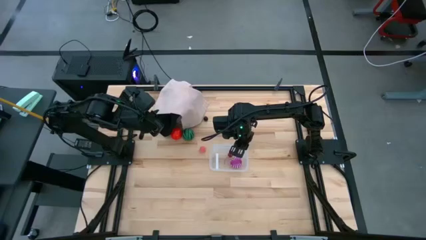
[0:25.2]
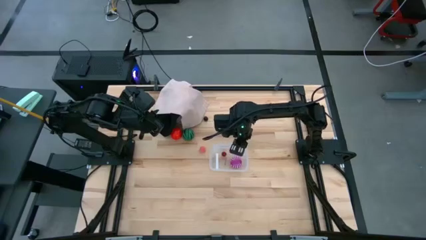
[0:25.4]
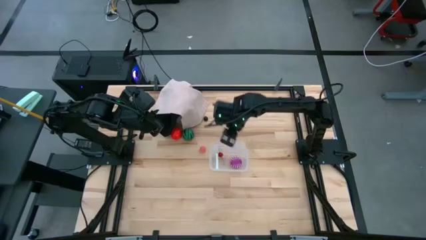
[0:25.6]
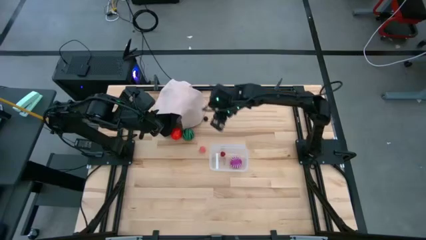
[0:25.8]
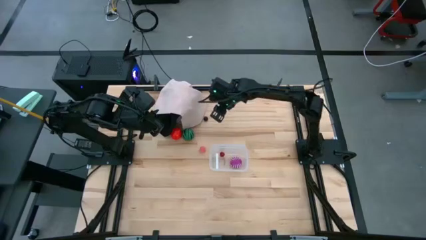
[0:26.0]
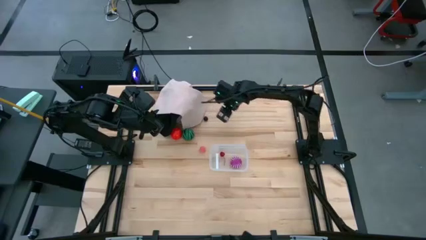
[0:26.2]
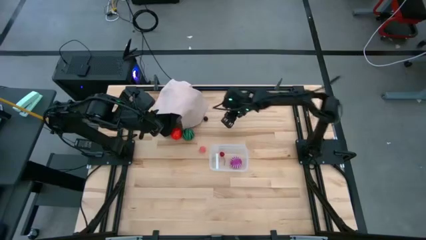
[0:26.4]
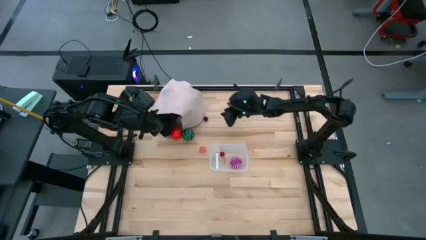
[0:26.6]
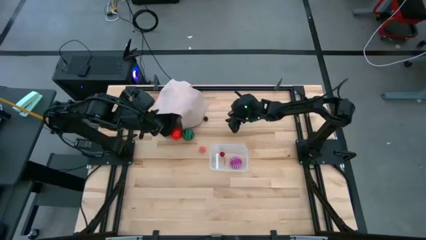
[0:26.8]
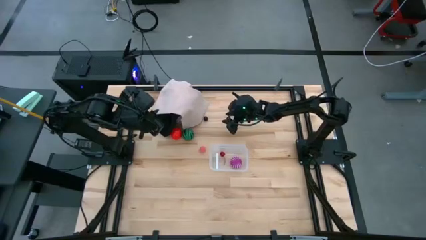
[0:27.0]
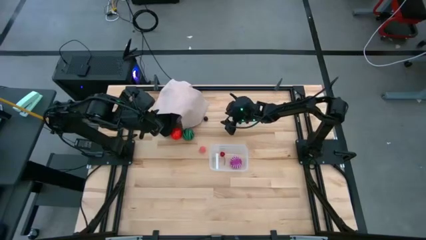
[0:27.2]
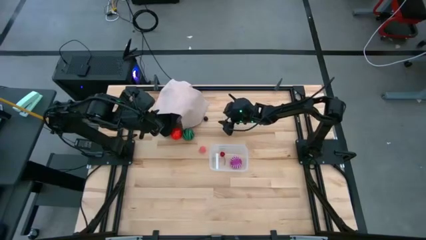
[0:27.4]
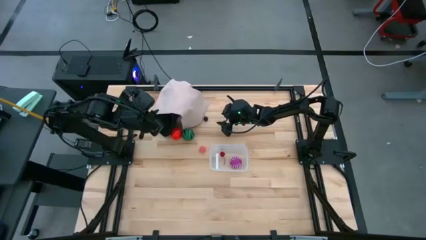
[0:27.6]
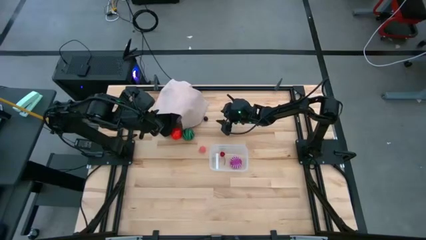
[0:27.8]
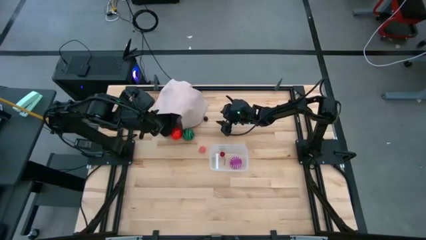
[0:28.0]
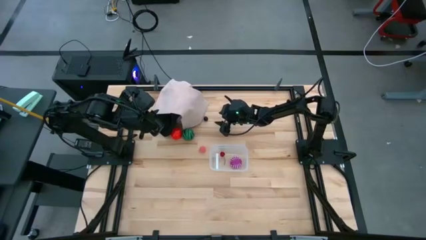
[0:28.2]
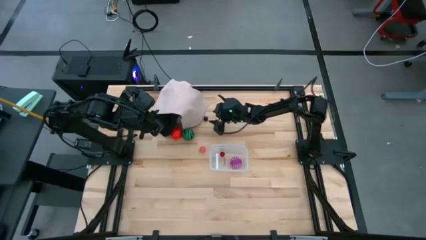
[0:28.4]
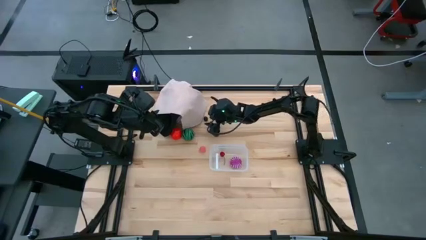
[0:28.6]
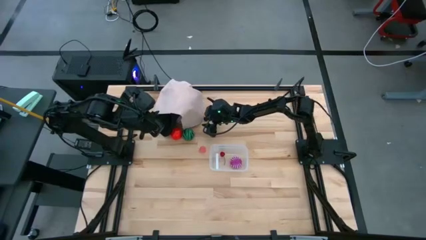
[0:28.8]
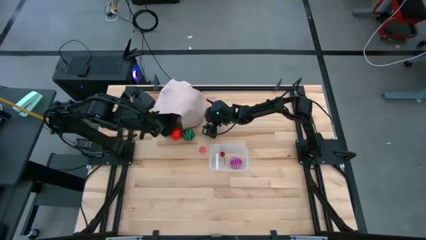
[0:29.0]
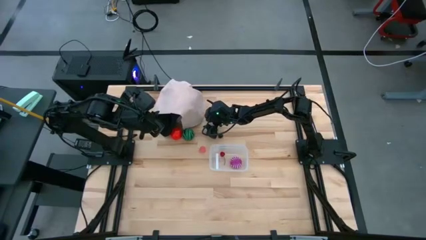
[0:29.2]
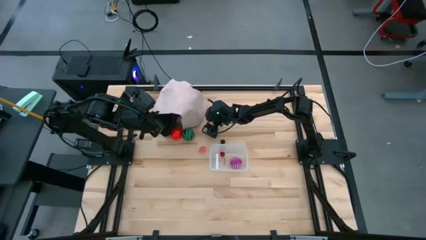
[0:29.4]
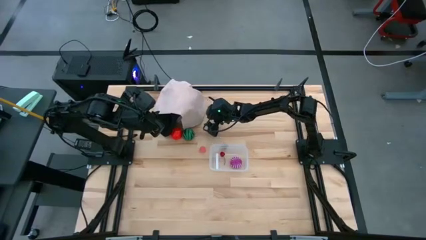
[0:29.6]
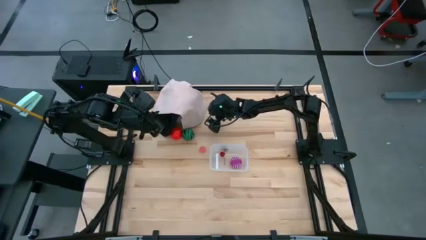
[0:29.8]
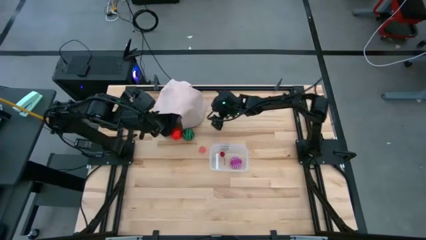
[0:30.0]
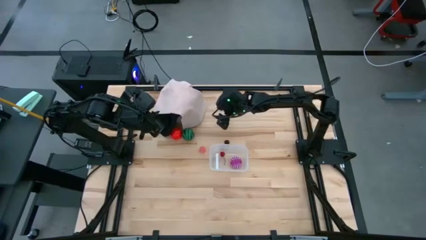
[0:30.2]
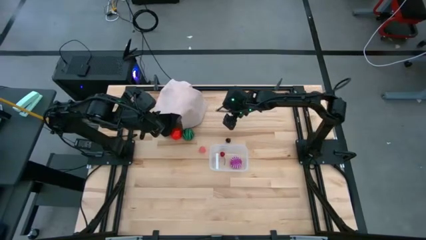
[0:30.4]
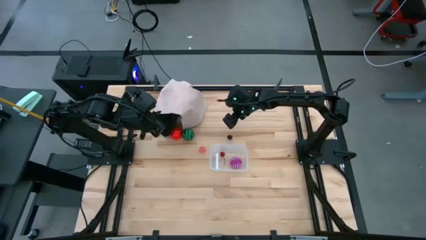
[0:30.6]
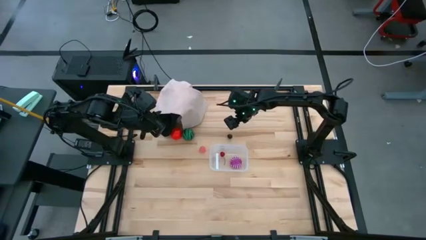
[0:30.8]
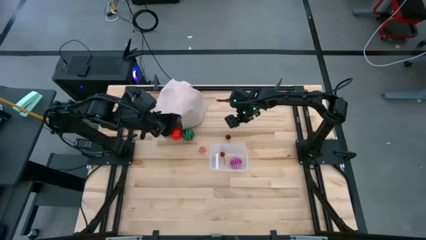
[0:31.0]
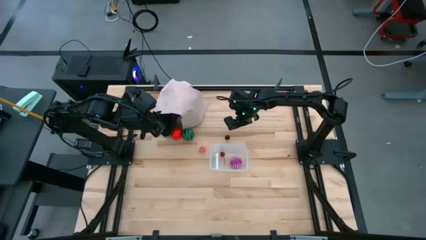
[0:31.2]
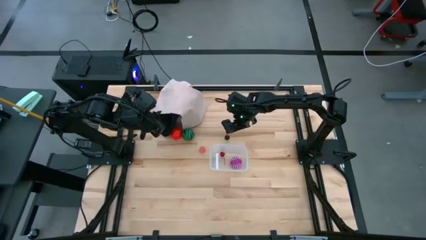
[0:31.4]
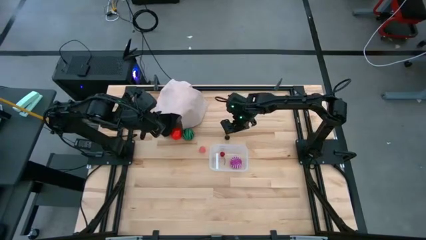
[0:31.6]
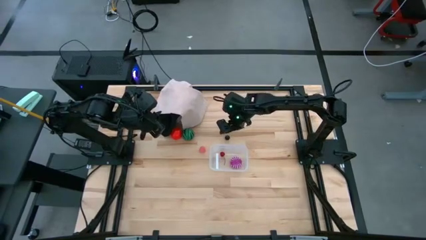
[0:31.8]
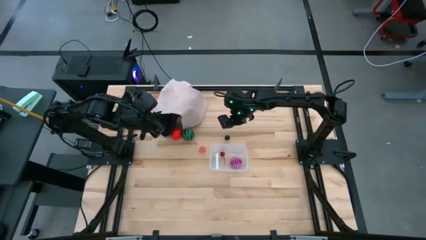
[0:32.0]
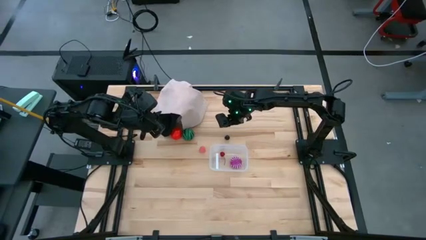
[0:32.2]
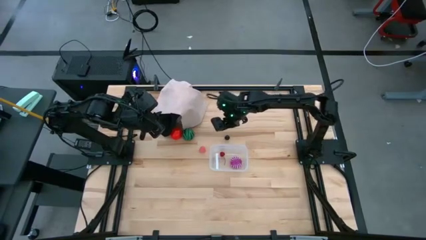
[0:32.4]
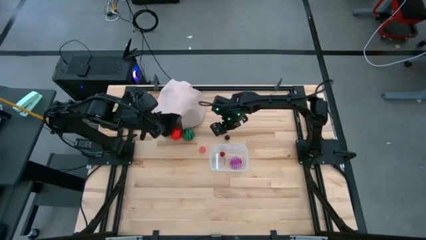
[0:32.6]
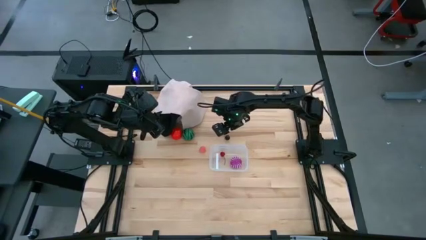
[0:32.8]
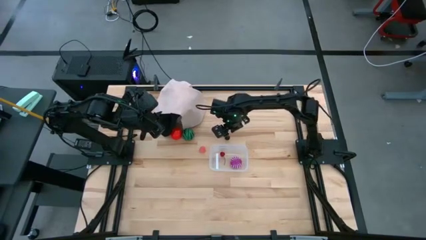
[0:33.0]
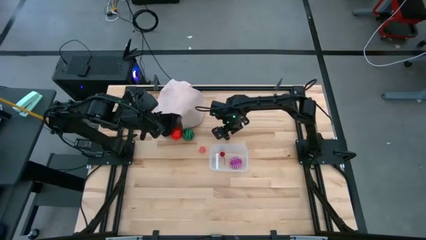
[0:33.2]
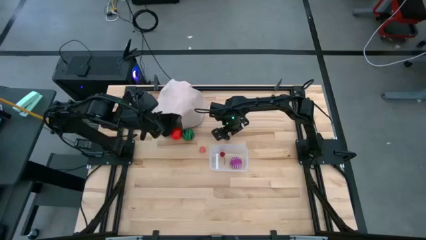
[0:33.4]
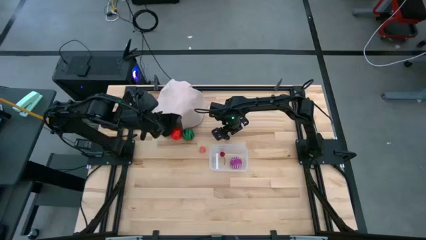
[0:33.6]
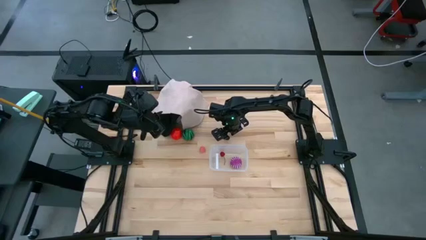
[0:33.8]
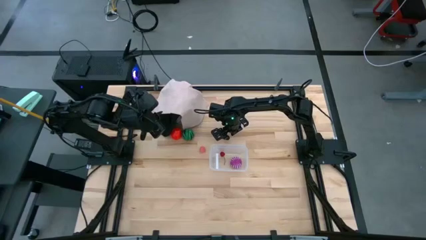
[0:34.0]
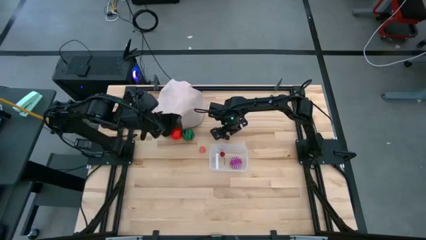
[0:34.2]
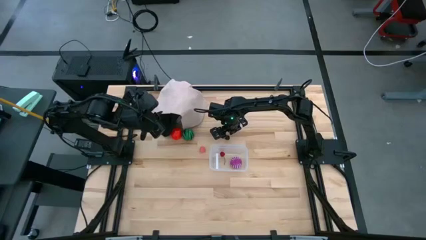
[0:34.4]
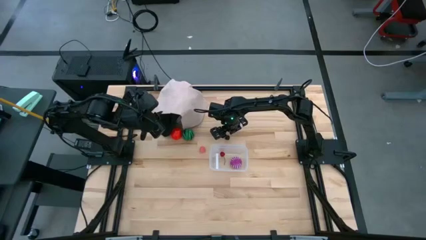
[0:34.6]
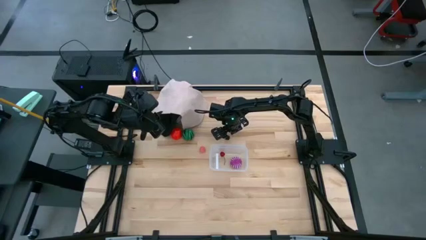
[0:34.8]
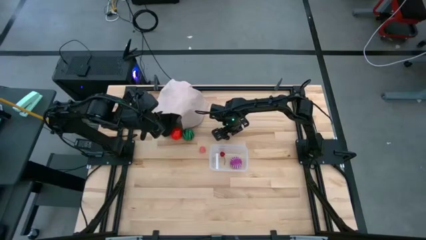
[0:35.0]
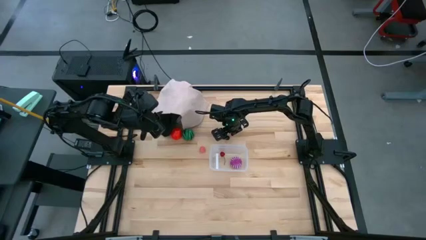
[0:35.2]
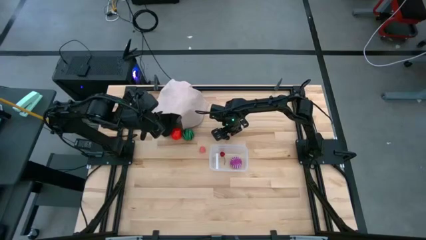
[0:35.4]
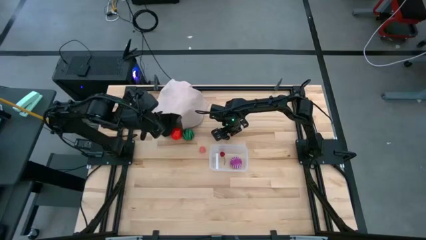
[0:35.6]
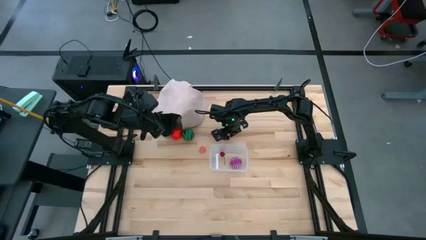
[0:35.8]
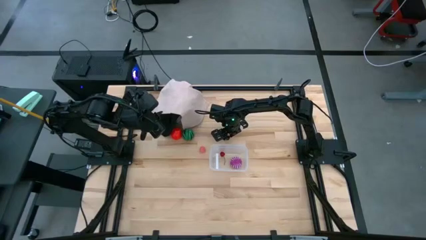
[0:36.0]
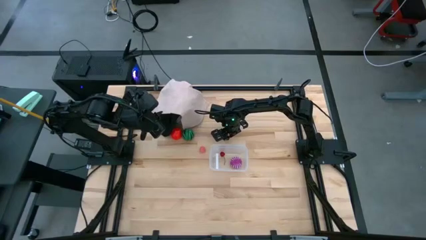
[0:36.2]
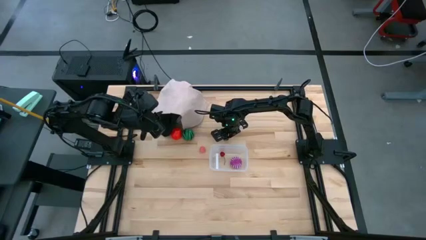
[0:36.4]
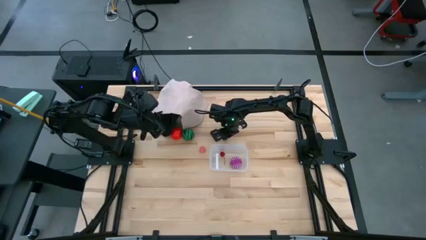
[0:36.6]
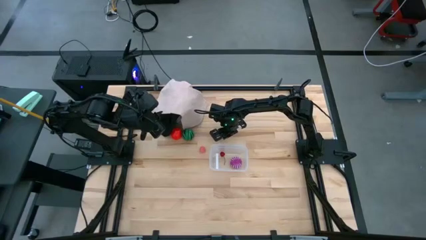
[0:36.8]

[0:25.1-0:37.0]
Task: Pick and placing Produce into tupperware
Put the plum into the transparent bin
